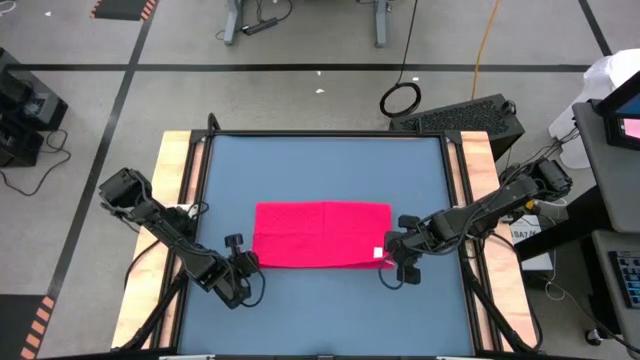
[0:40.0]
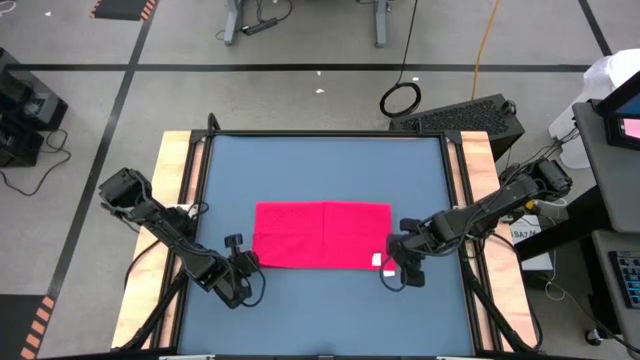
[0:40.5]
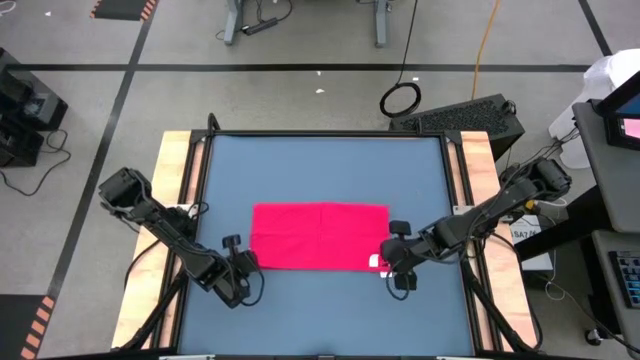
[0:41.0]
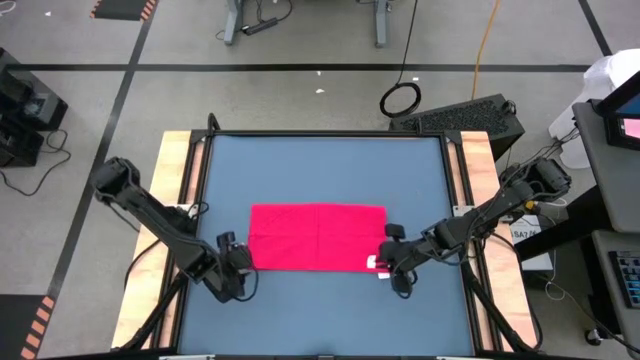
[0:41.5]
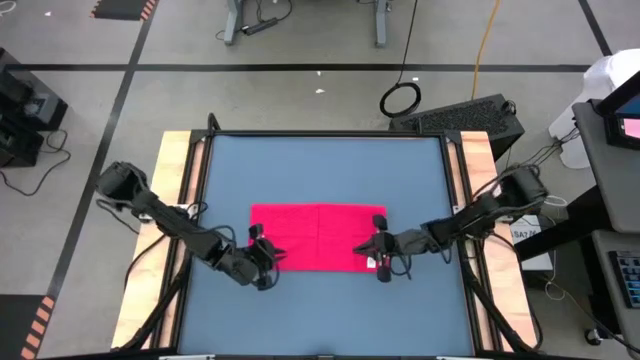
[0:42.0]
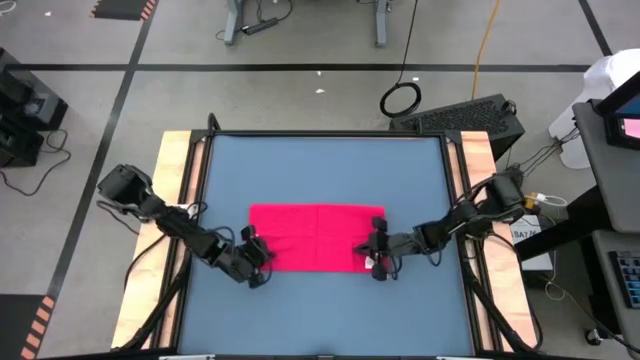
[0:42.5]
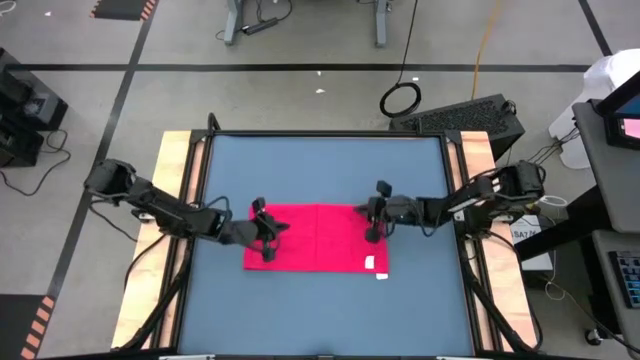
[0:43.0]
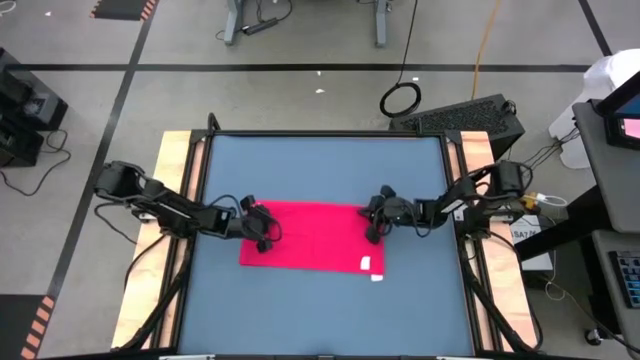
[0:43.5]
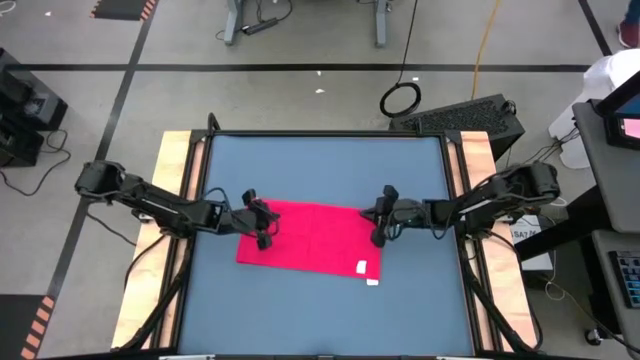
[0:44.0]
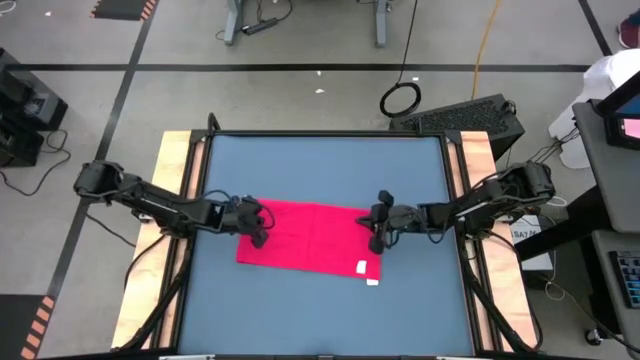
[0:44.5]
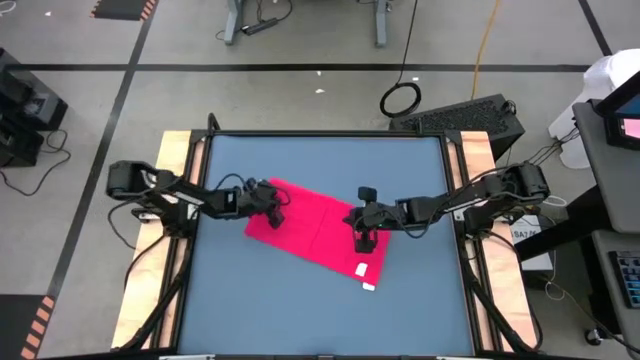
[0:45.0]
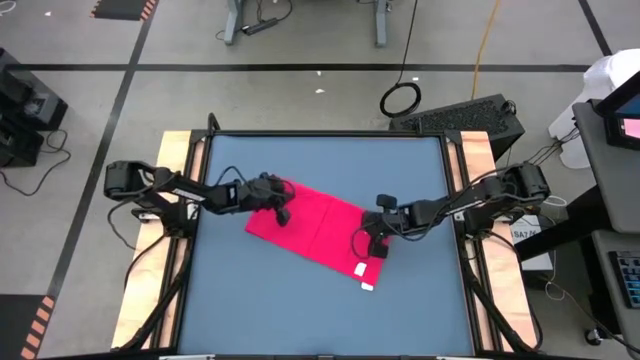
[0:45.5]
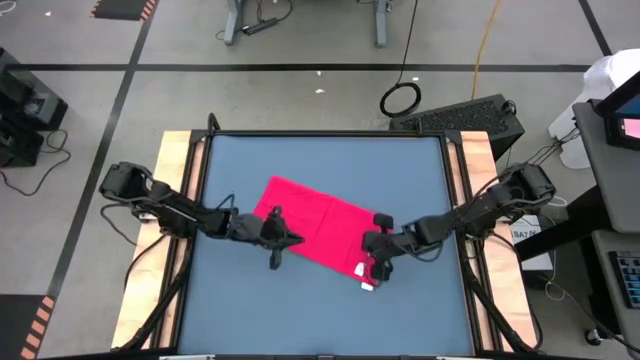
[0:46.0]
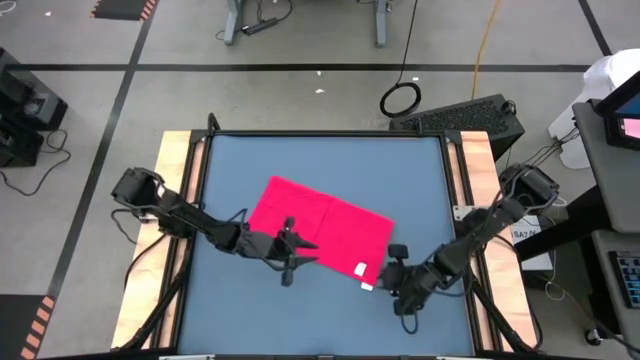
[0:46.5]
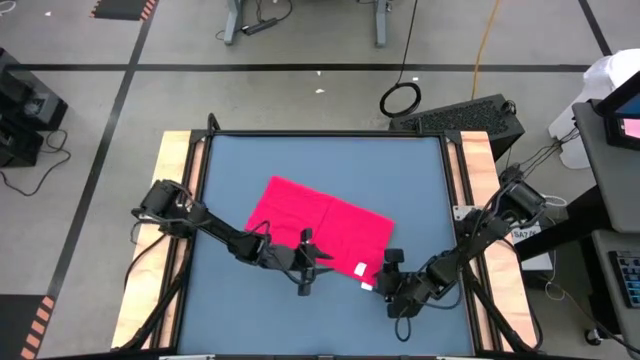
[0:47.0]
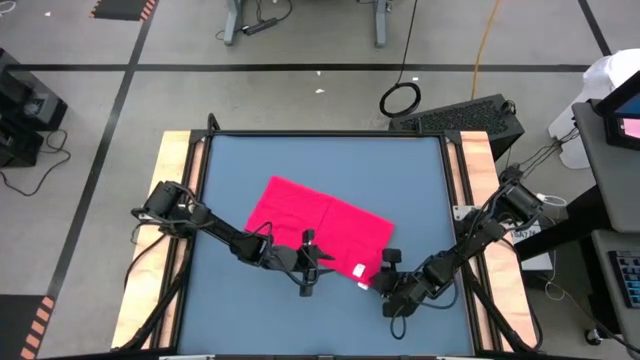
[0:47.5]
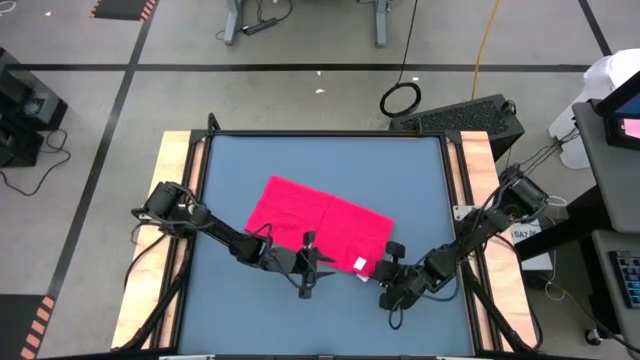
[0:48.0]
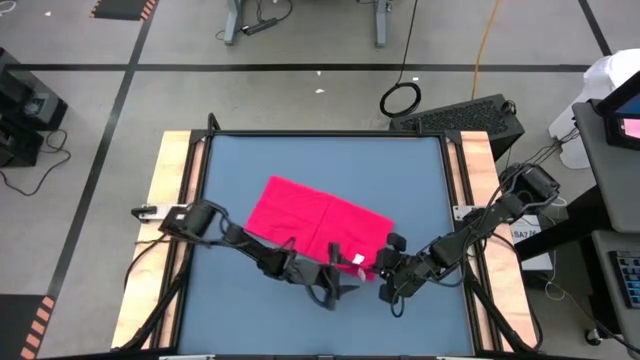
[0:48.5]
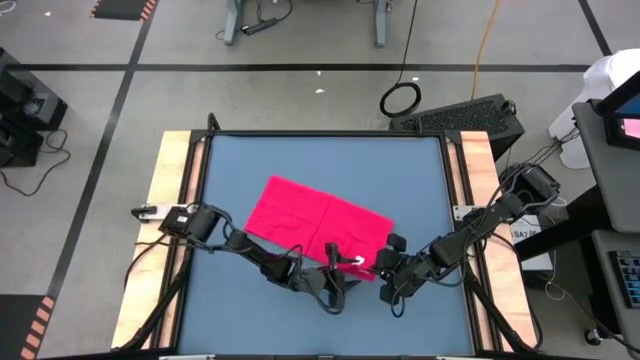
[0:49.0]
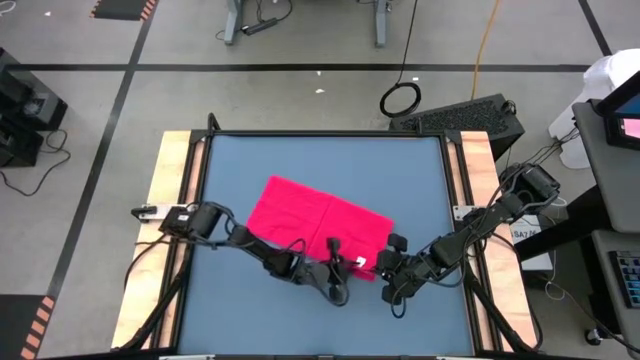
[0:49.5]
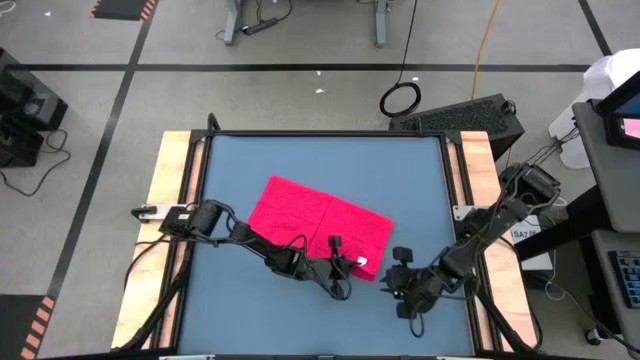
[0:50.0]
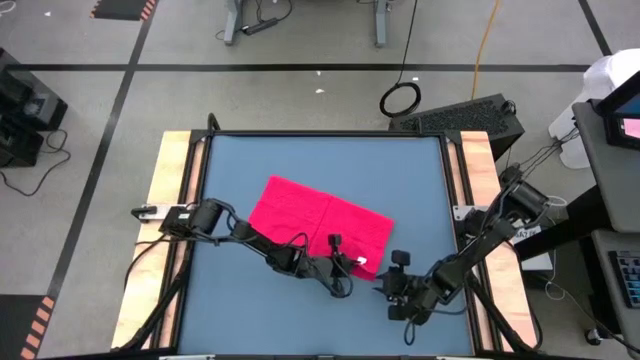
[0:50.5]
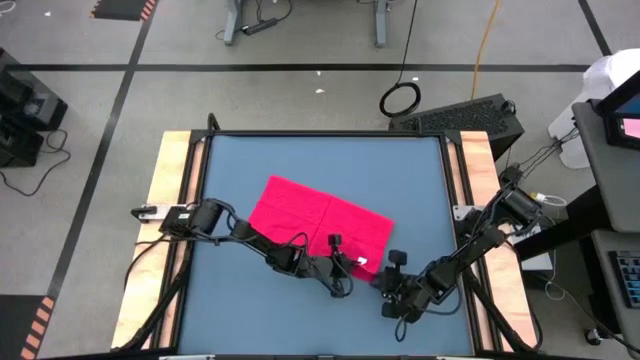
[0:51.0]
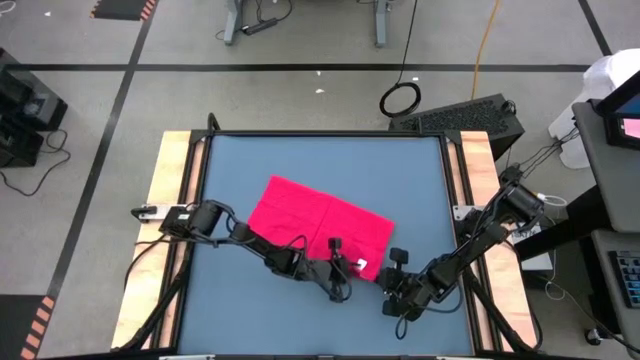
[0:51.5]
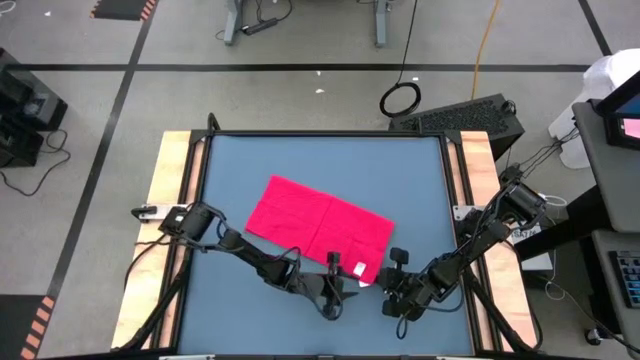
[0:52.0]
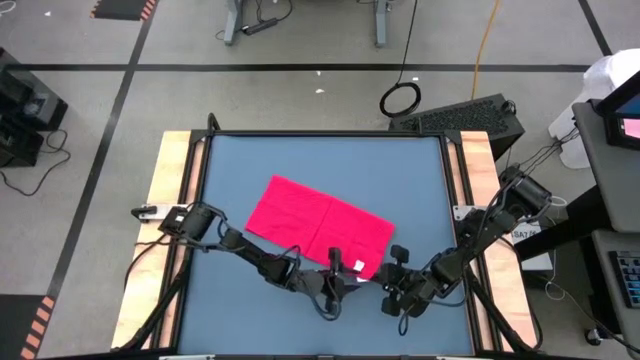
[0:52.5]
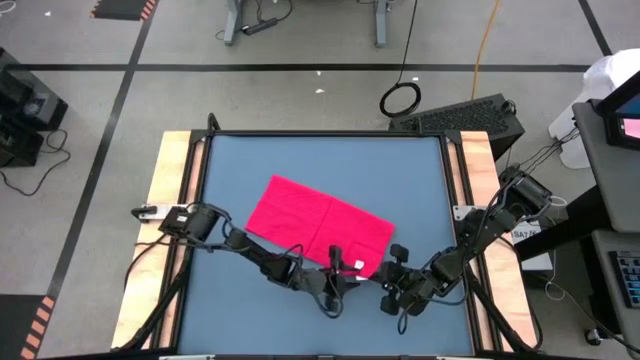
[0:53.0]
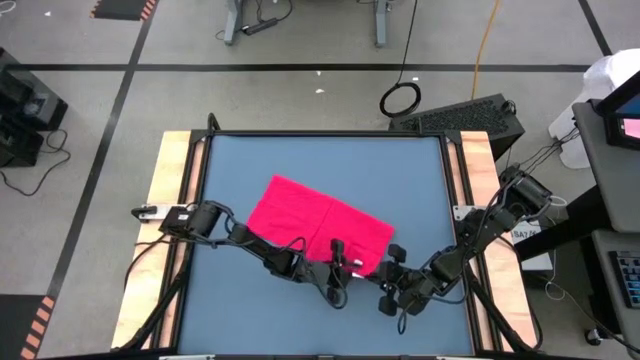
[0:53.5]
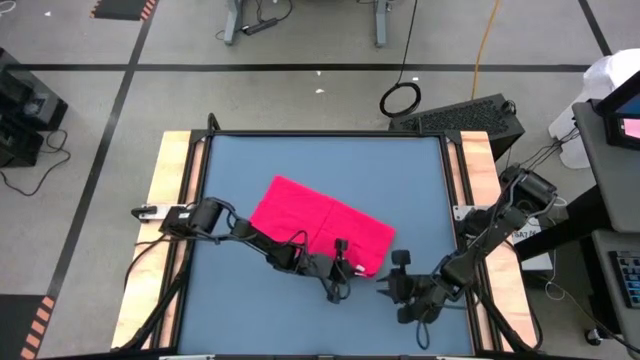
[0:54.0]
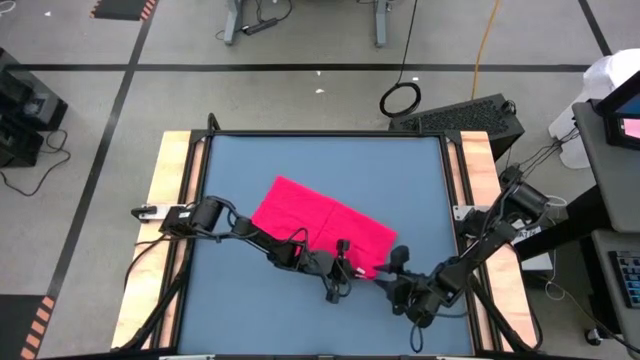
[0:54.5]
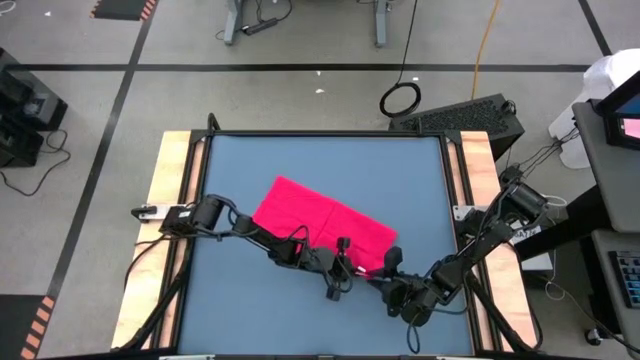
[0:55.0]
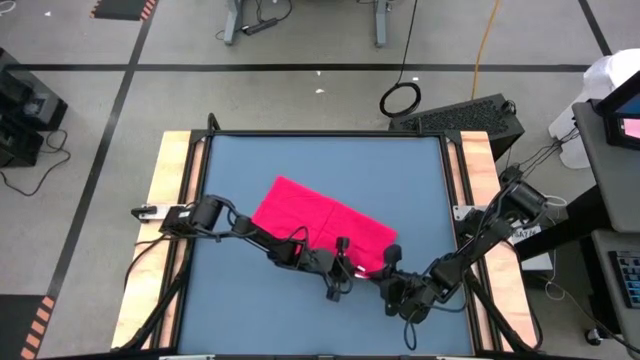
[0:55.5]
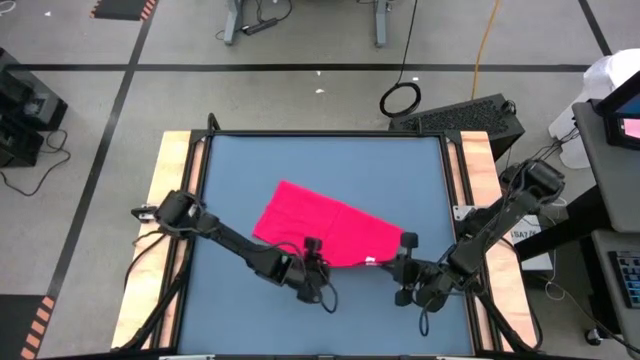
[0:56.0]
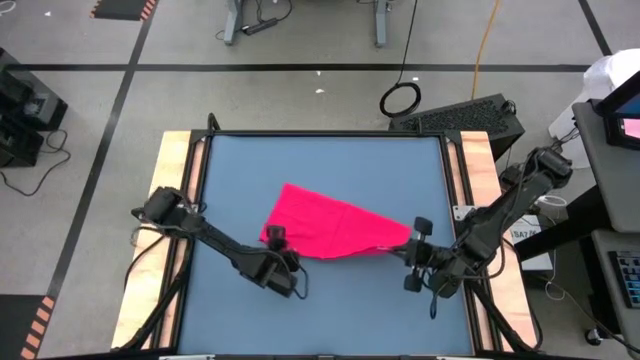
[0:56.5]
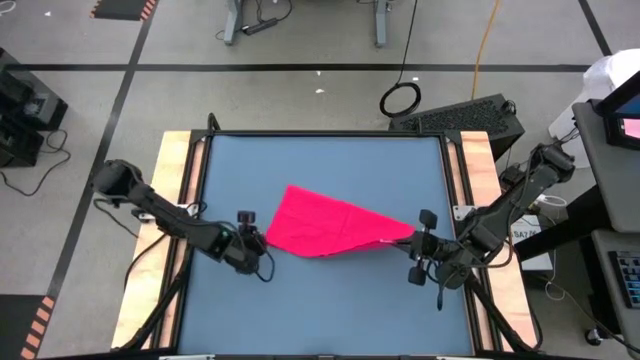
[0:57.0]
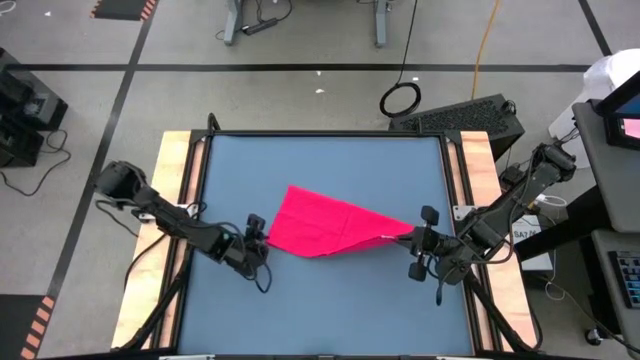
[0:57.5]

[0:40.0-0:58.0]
Task: Roll towel
Fold the red towel

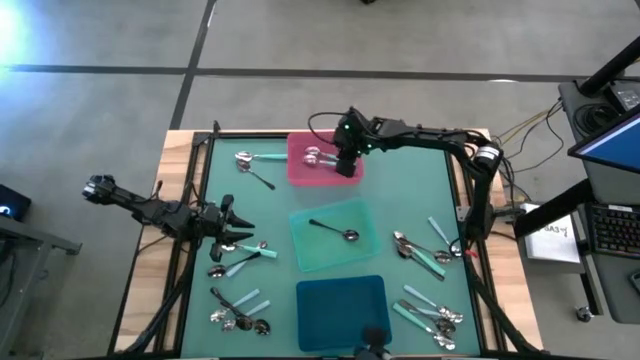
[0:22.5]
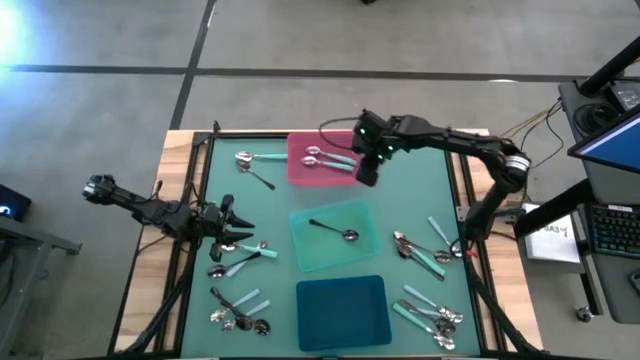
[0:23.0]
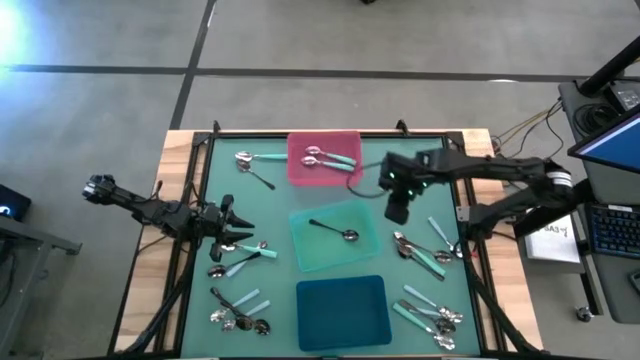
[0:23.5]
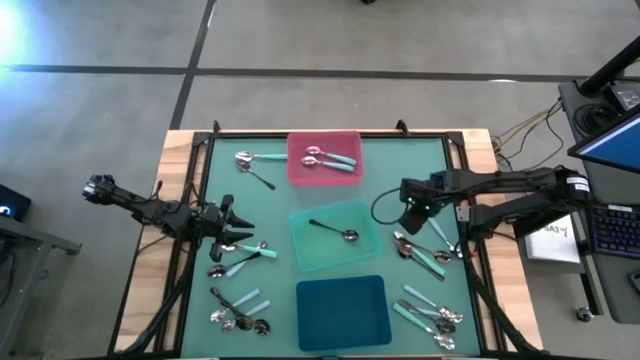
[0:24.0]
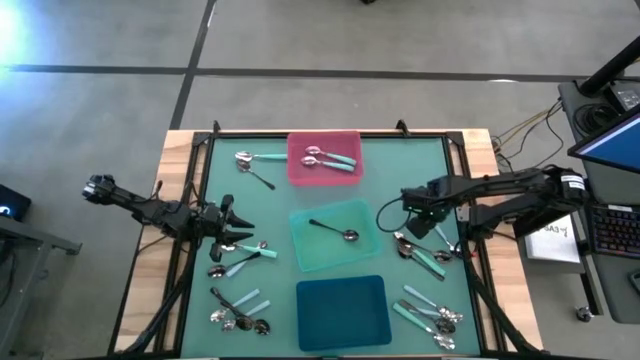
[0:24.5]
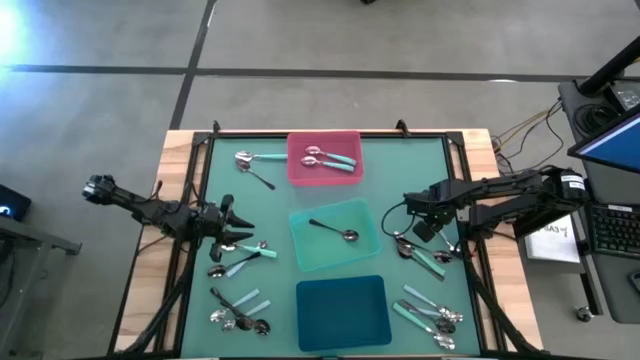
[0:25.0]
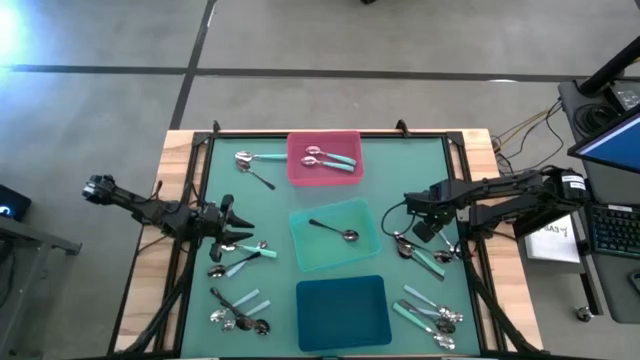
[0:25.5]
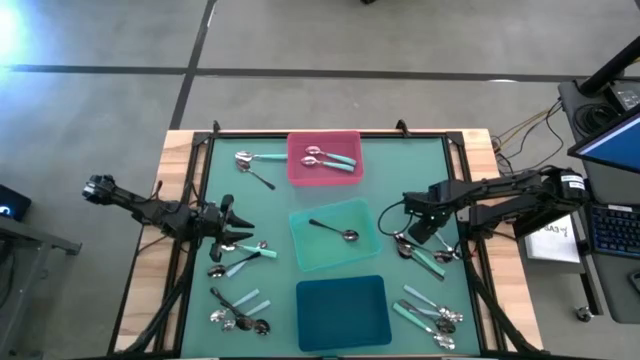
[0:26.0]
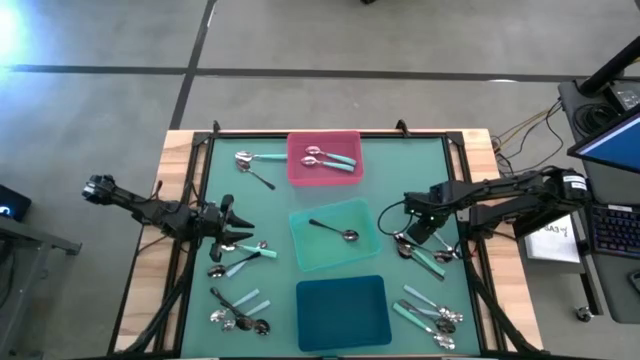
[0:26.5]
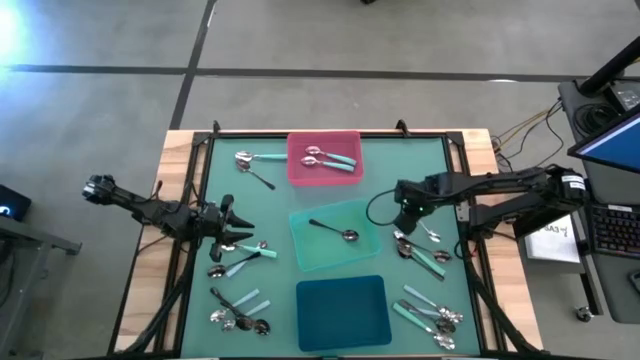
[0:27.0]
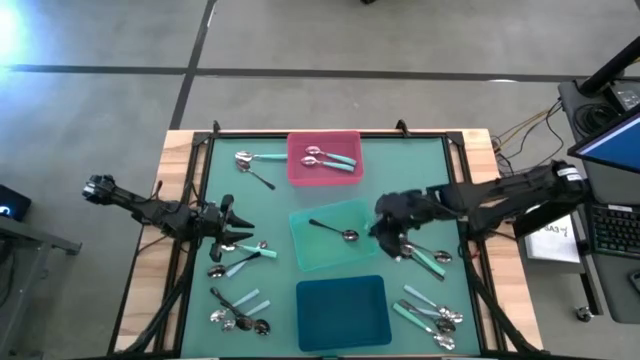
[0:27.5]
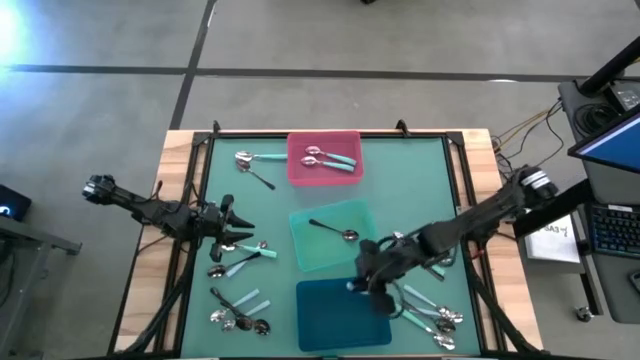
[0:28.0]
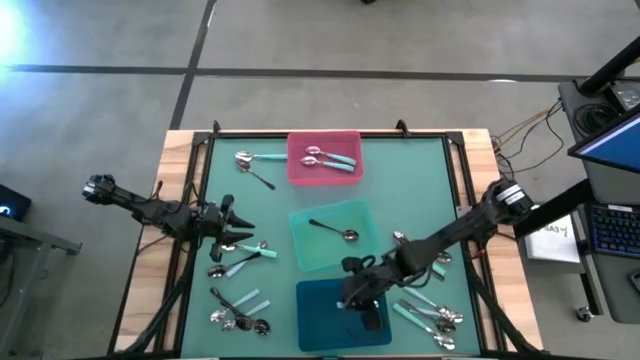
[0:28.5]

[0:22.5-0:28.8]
Task: Sort silverware by color (type)
Put the blue spoon into the blue bin
